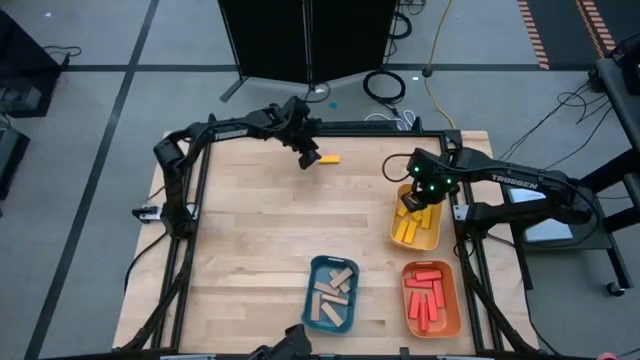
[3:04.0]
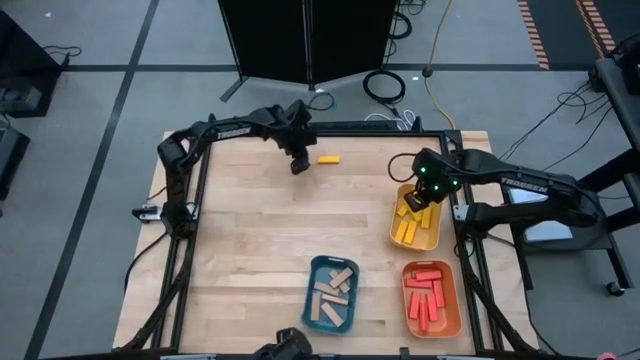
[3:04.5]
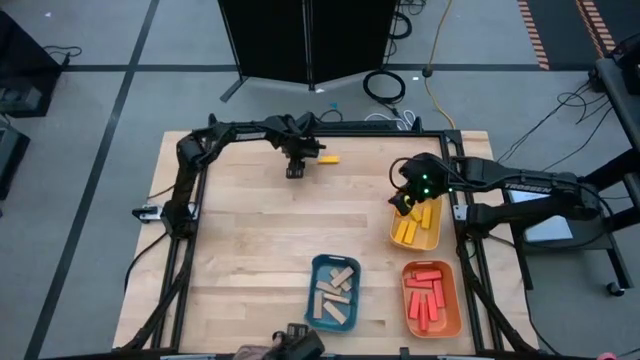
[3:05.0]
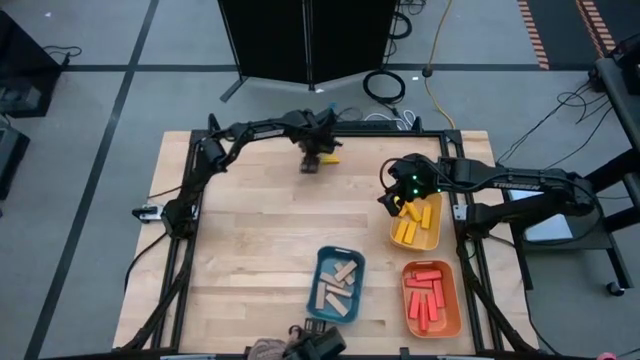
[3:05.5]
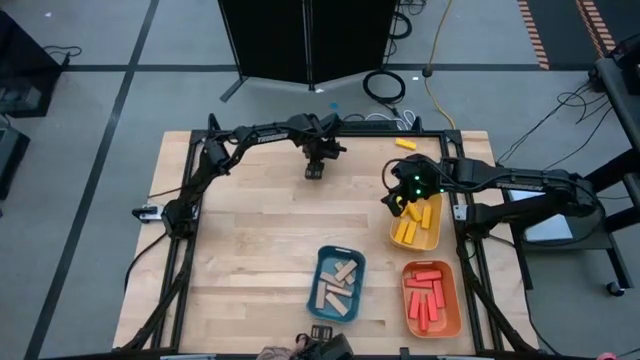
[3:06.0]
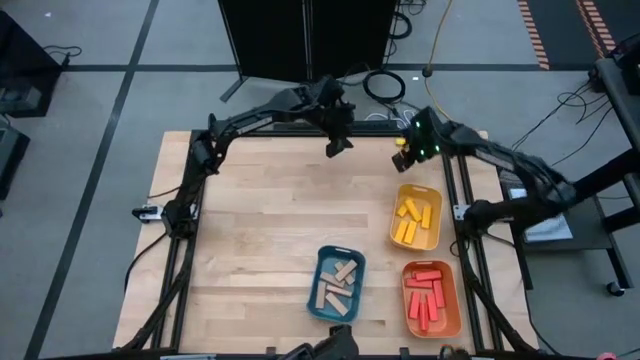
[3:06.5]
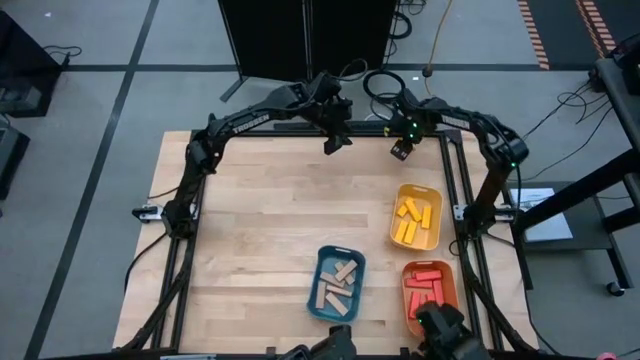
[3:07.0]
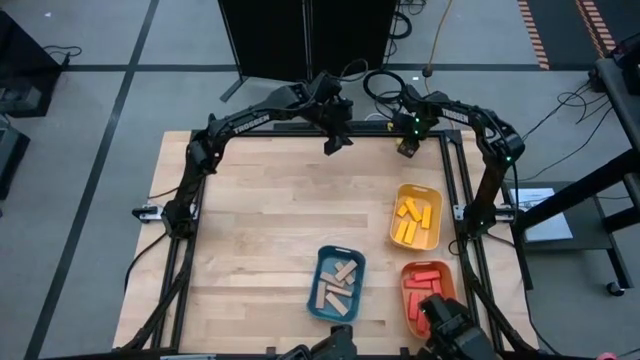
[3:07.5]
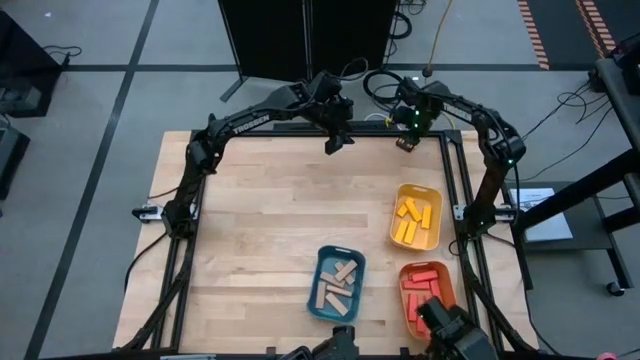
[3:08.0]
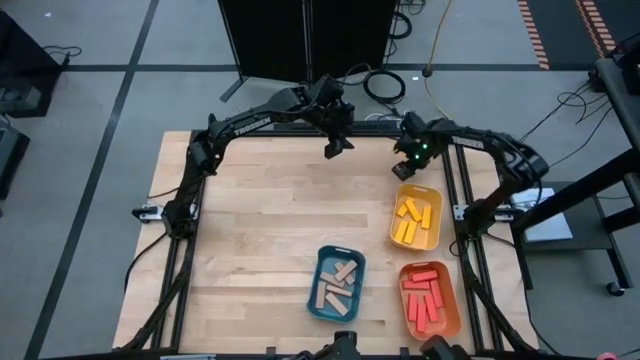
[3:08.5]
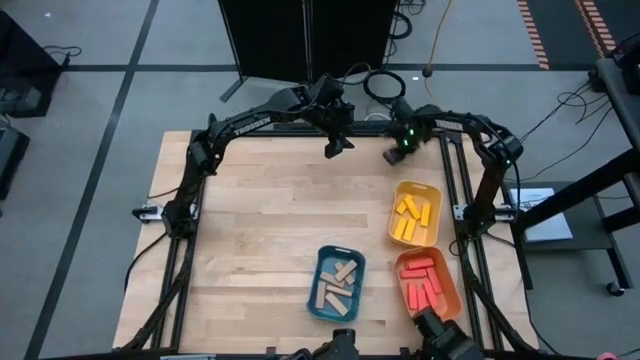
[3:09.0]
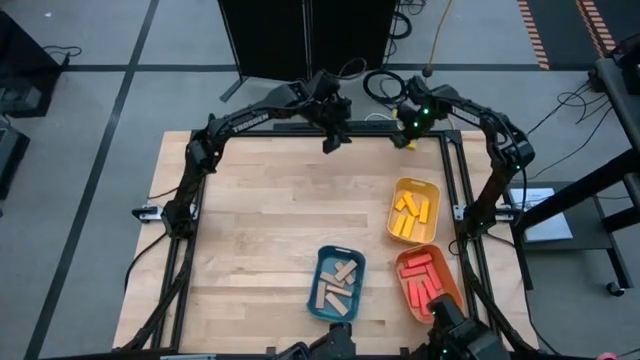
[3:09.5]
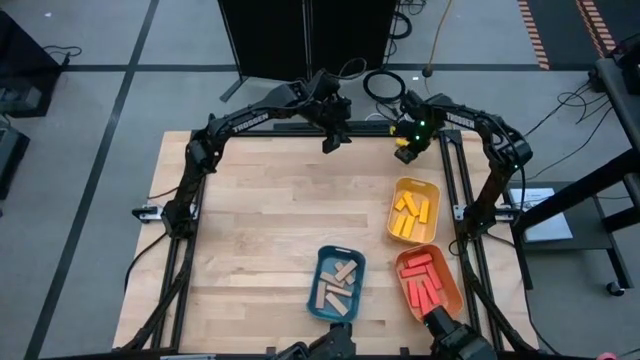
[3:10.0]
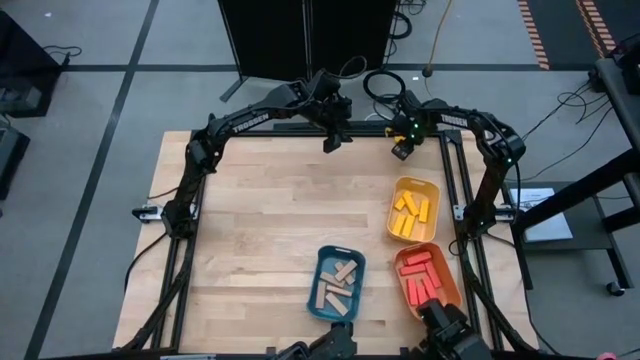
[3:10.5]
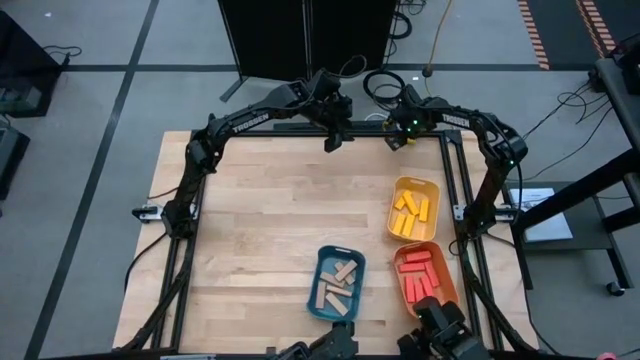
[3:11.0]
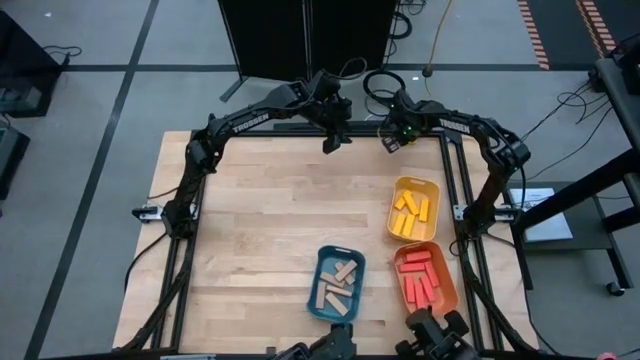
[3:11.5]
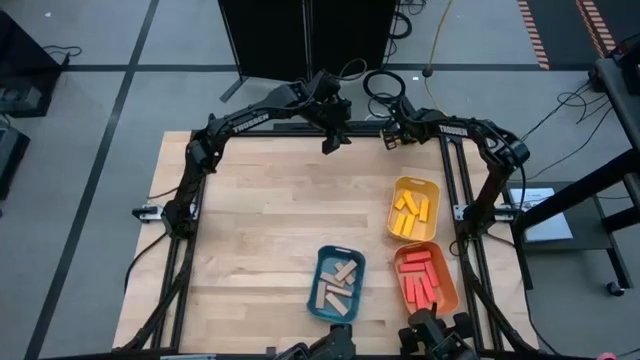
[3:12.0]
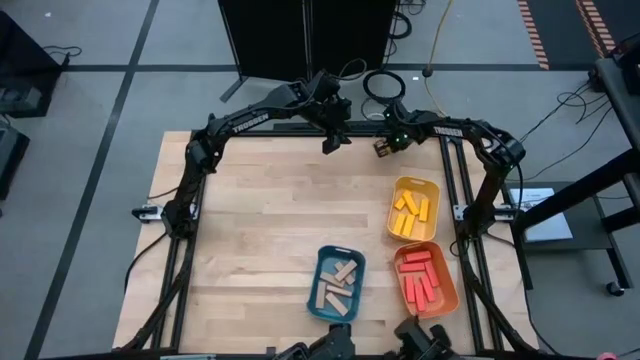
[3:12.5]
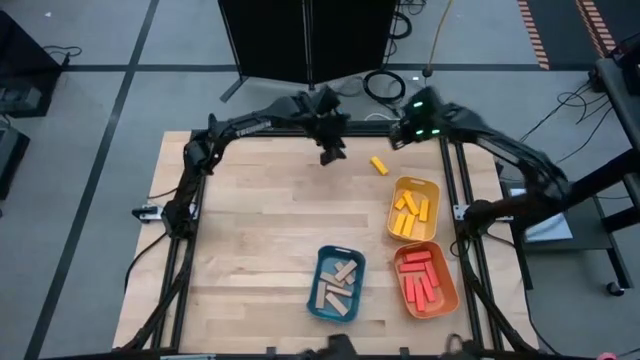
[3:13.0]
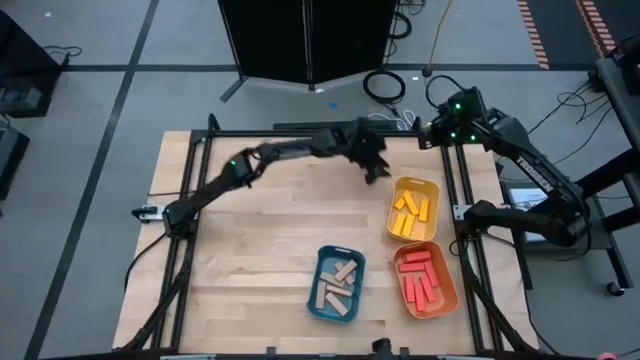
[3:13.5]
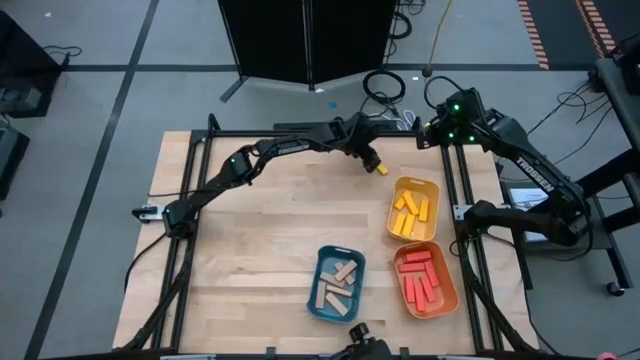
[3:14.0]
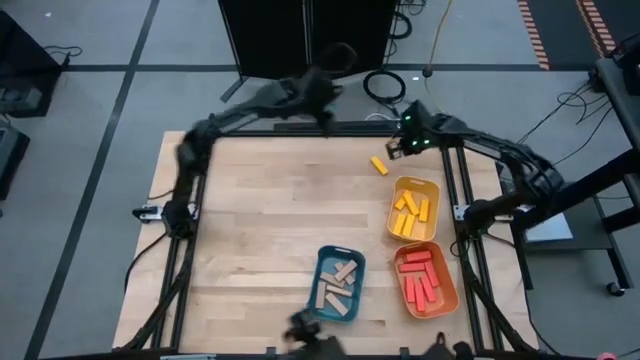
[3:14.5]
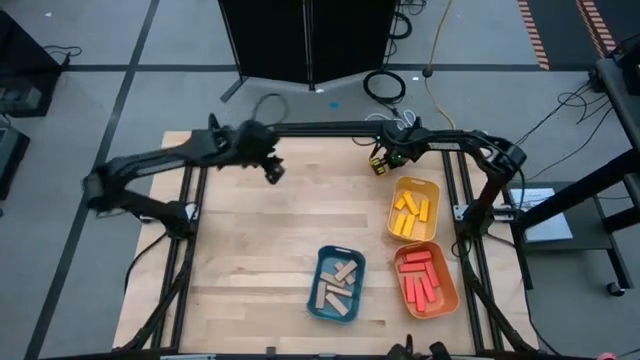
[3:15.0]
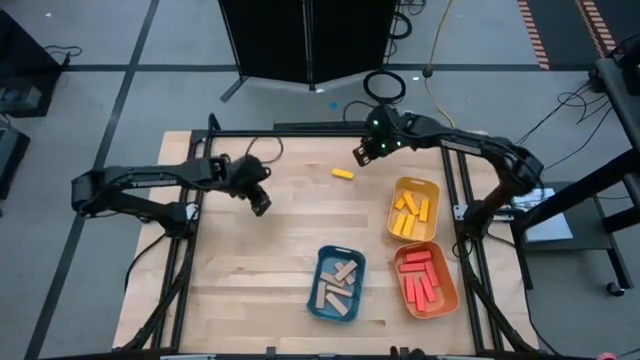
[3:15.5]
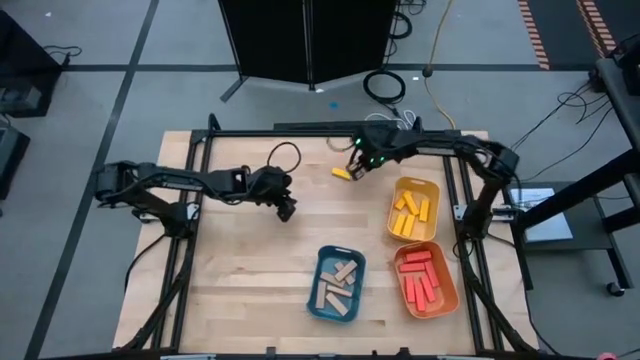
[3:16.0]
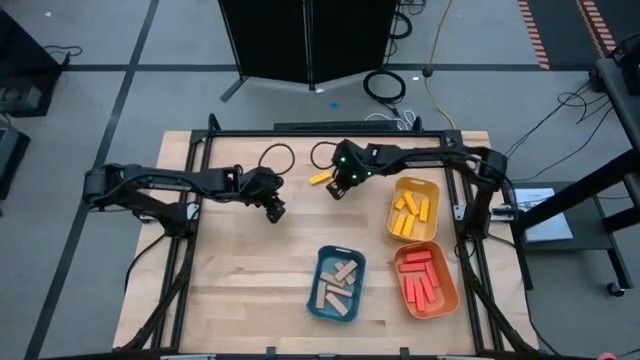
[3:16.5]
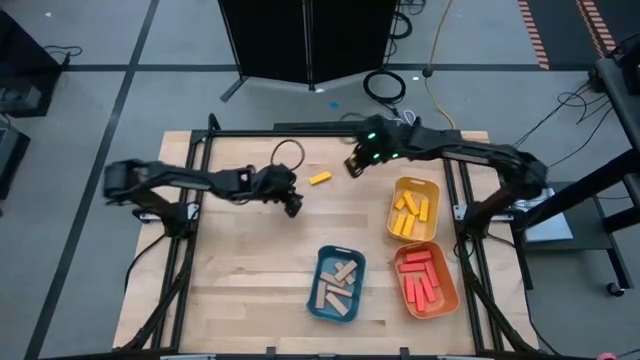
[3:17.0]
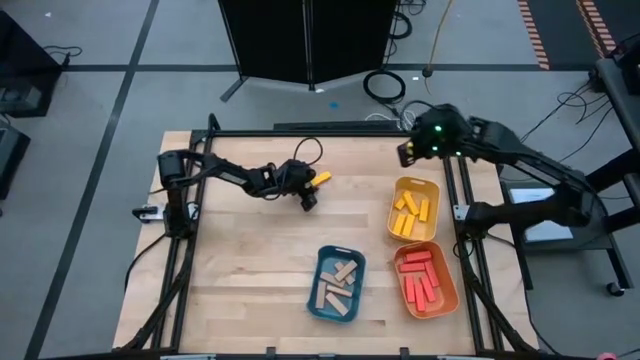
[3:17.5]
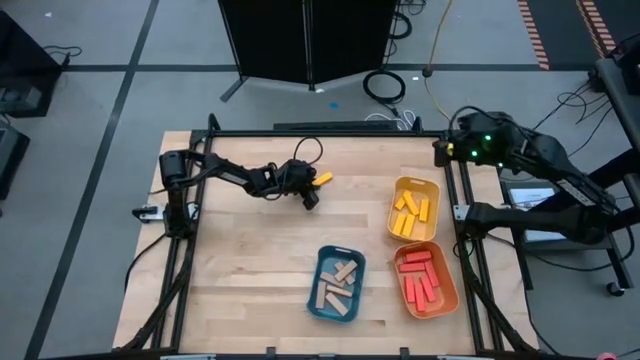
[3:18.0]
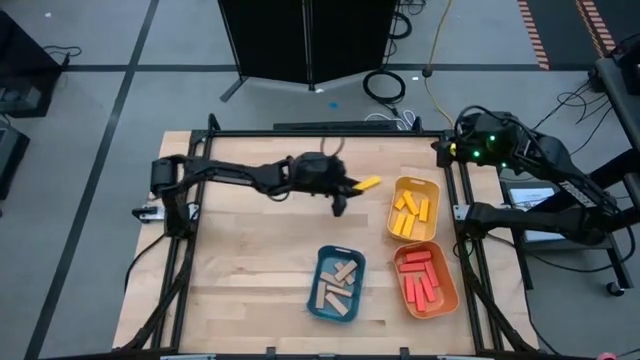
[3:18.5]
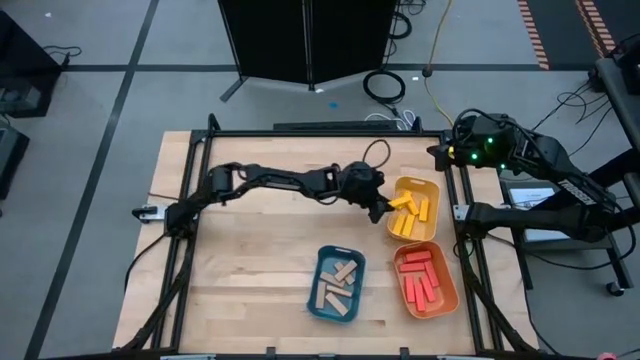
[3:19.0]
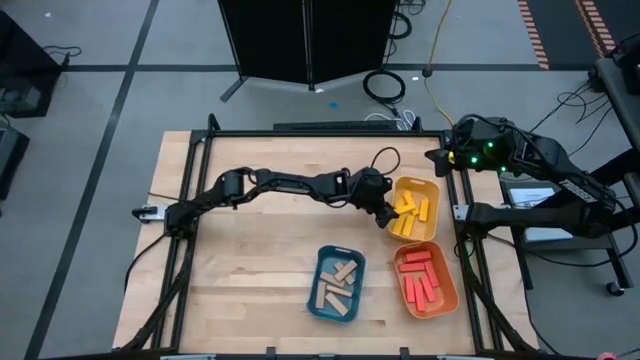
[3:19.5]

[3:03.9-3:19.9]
Task: Sort blocks
Put the yellow block into the yellow bin

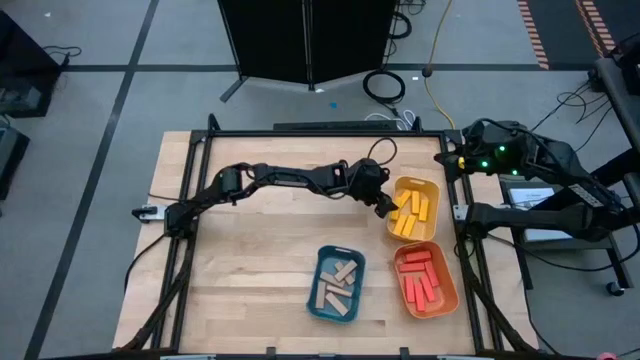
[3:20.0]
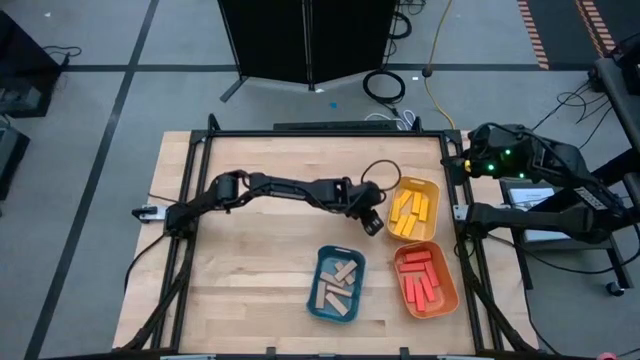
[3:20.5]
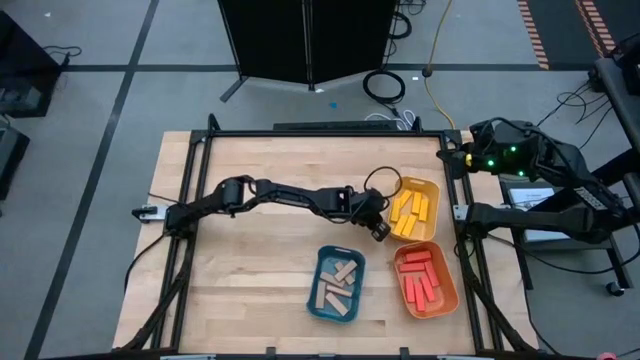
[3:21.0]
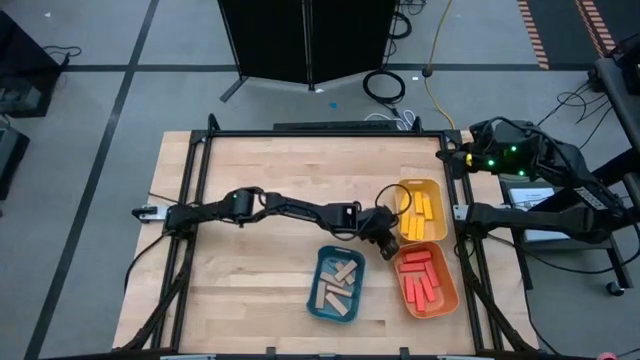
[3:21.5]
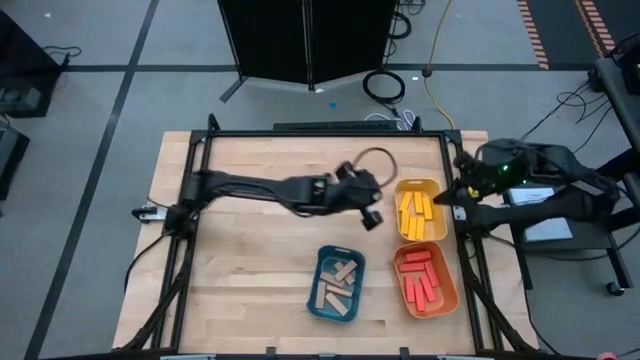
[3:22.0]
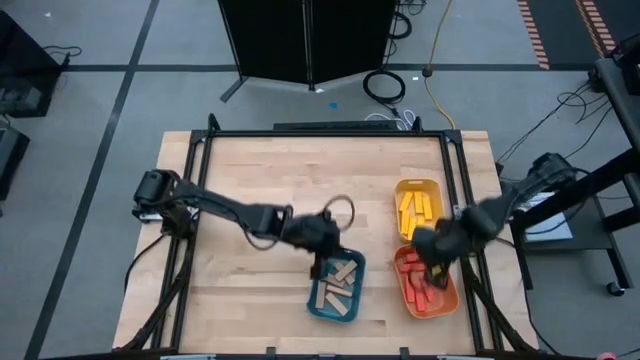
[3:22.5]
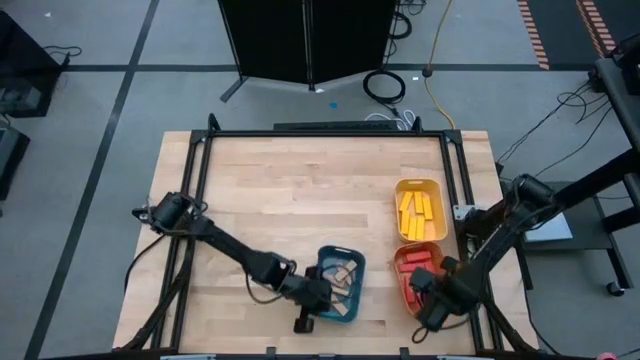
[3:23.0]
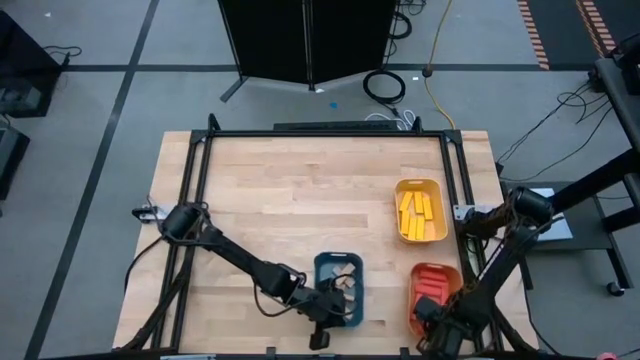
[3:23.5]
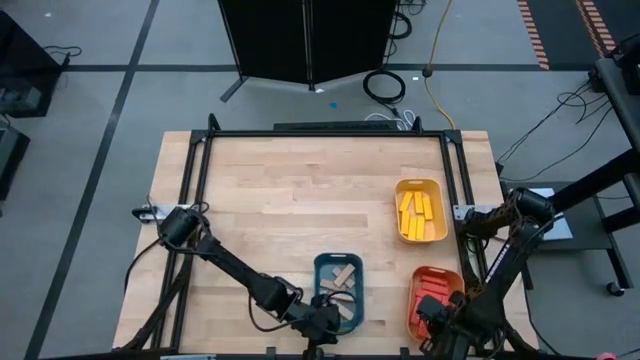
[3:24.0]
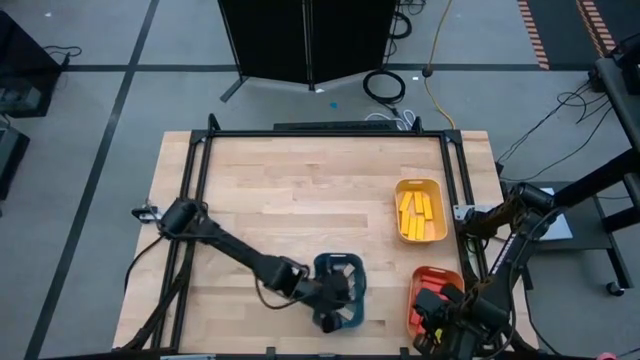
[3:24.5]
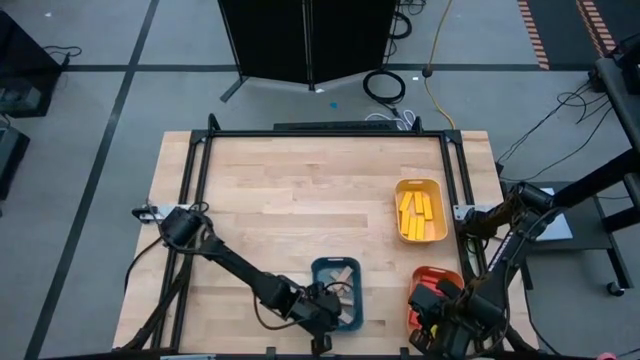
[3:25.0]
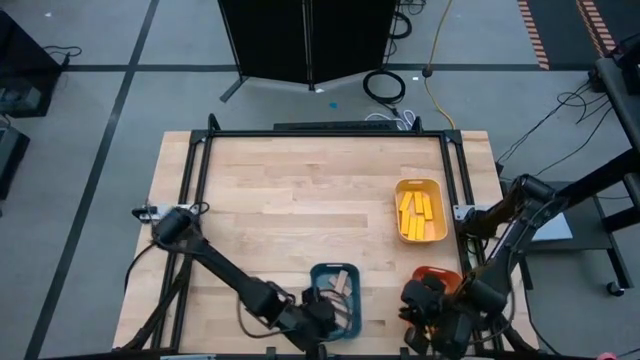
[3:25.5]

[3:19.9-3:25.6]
Adjust the bins on the table
